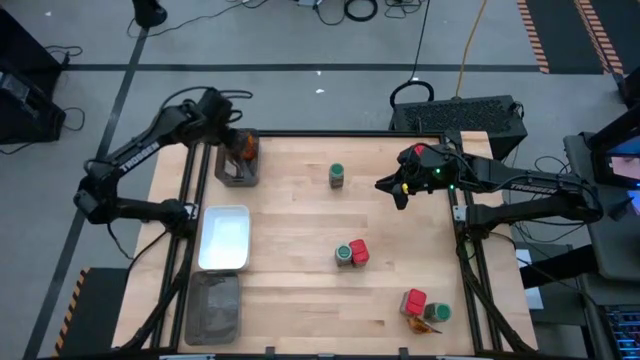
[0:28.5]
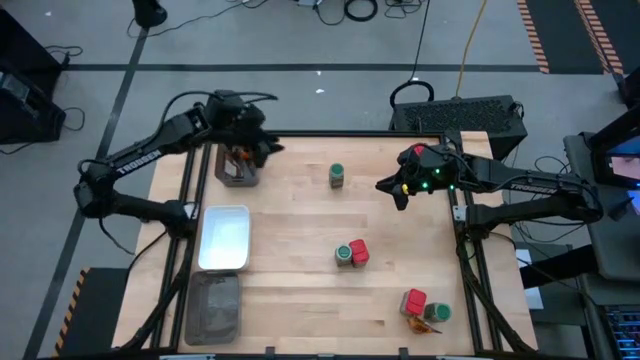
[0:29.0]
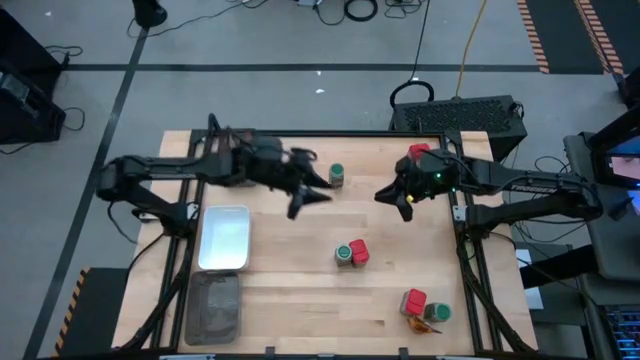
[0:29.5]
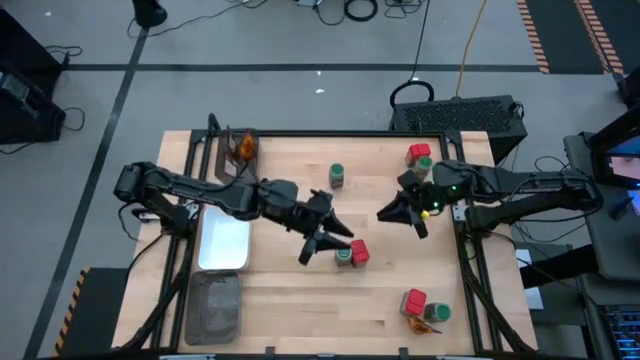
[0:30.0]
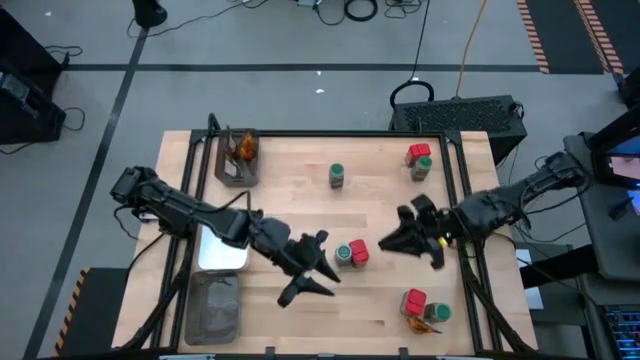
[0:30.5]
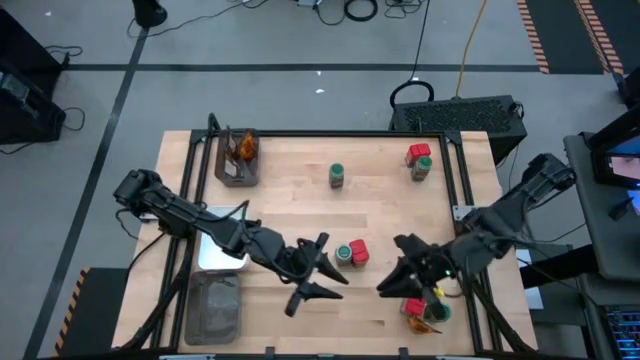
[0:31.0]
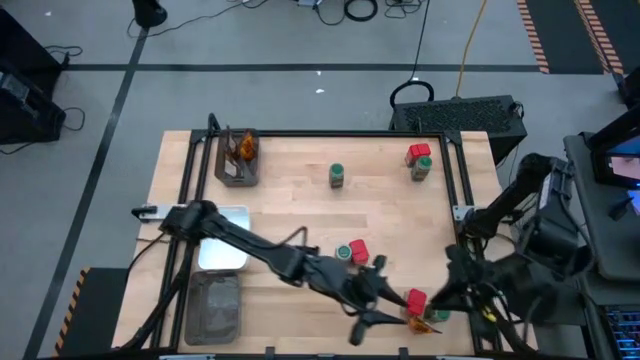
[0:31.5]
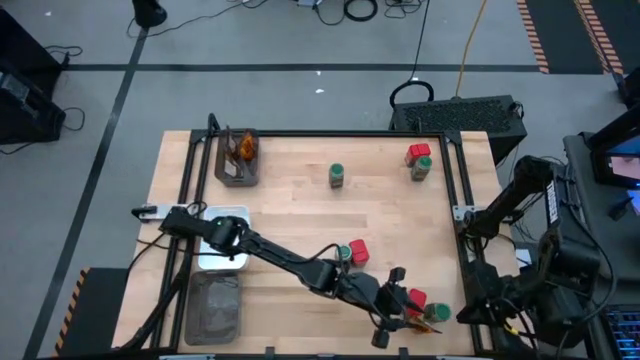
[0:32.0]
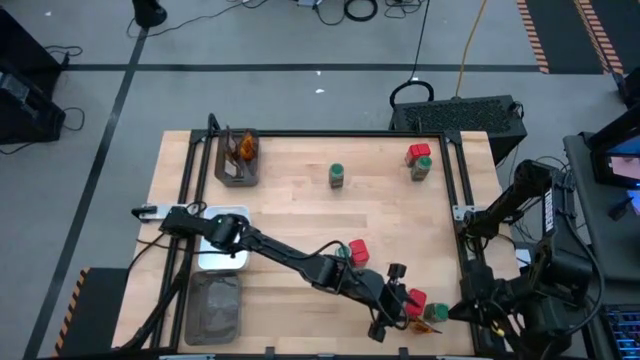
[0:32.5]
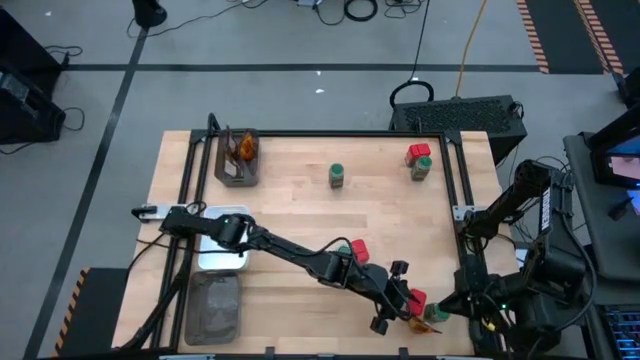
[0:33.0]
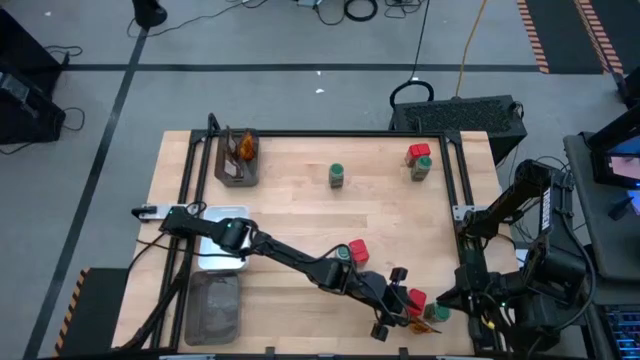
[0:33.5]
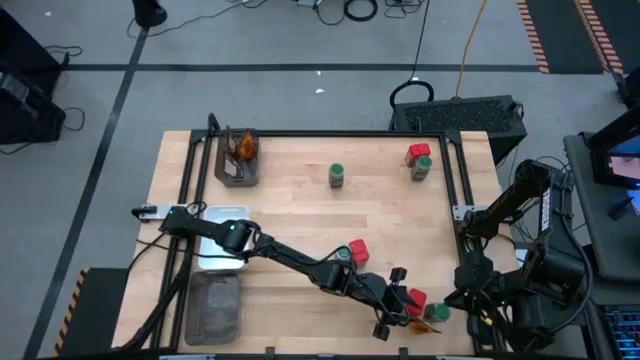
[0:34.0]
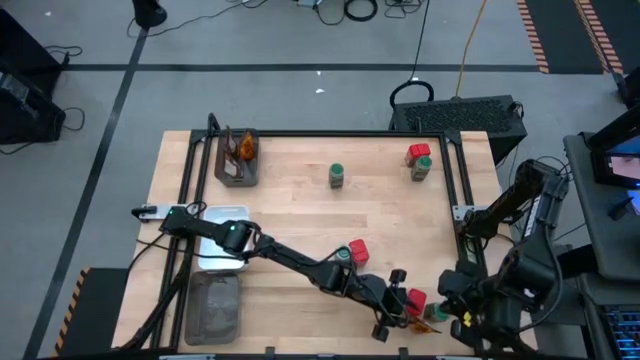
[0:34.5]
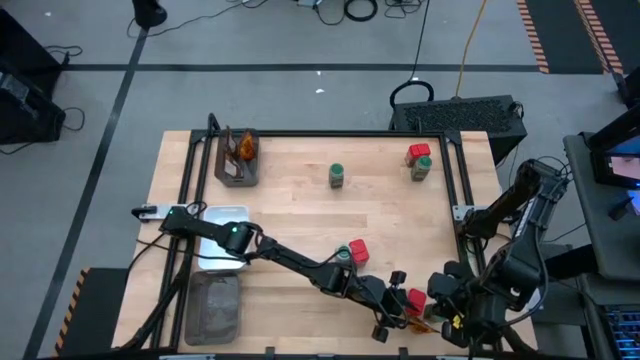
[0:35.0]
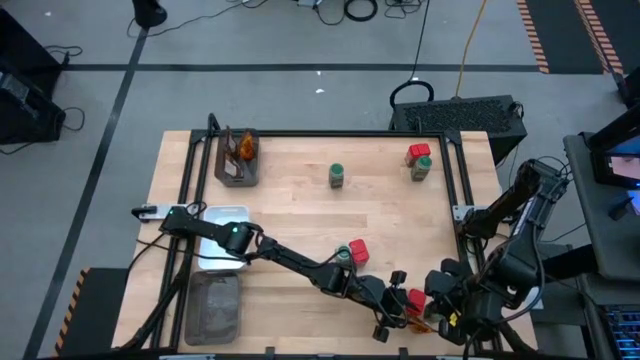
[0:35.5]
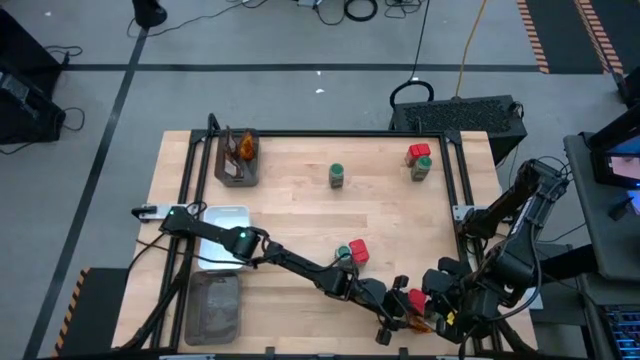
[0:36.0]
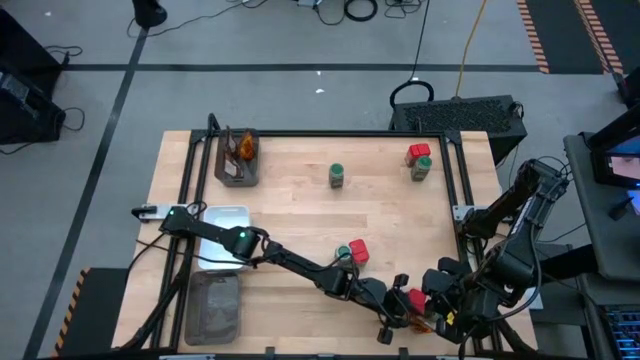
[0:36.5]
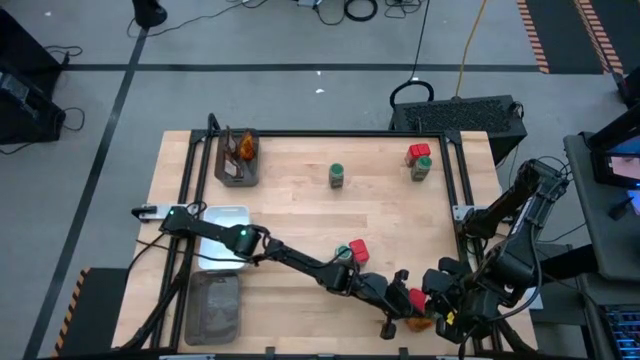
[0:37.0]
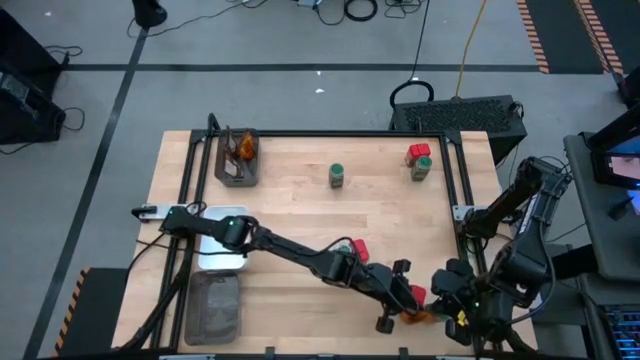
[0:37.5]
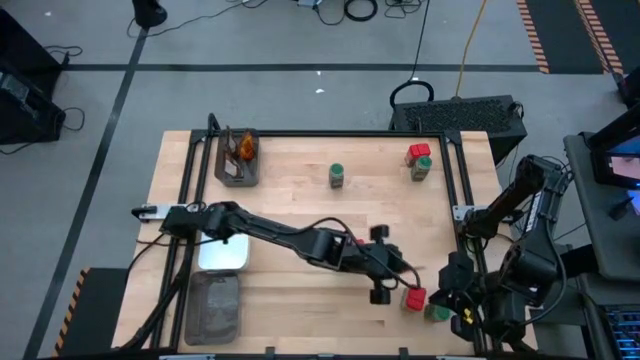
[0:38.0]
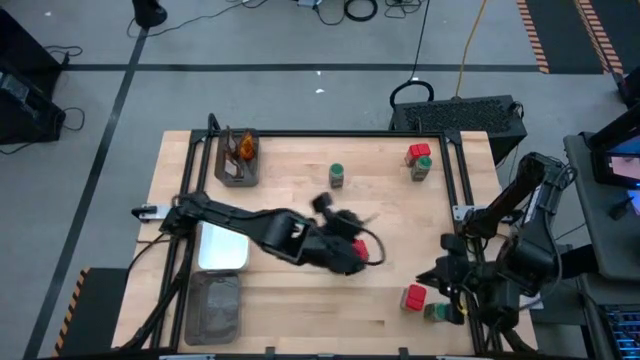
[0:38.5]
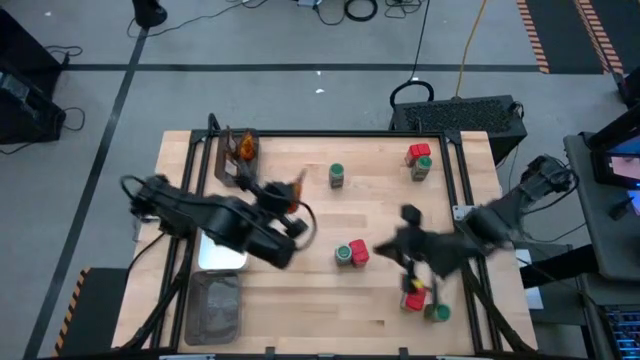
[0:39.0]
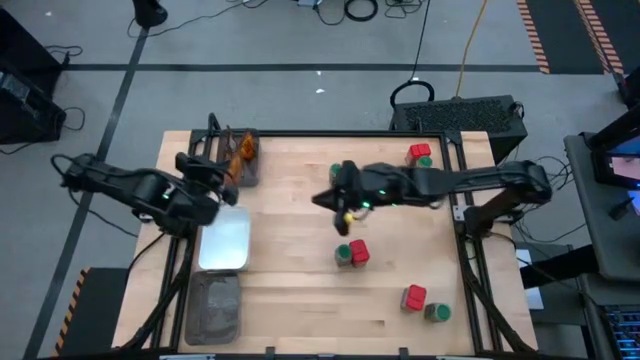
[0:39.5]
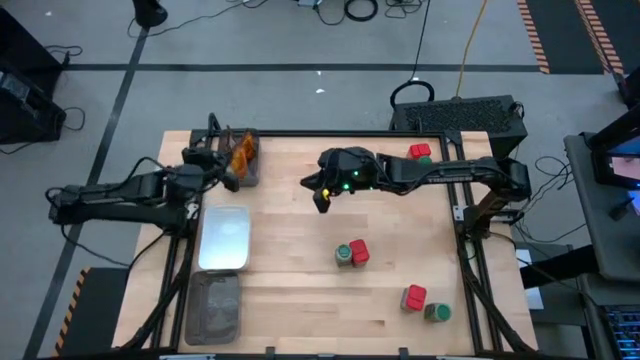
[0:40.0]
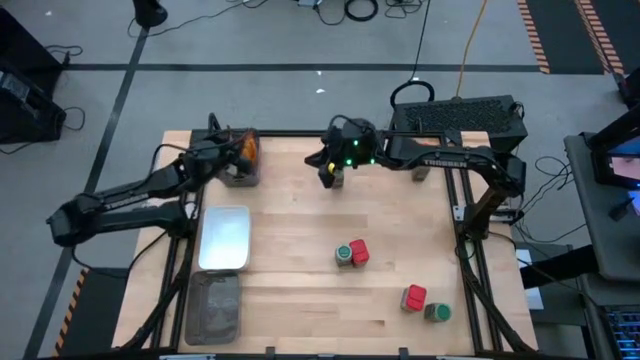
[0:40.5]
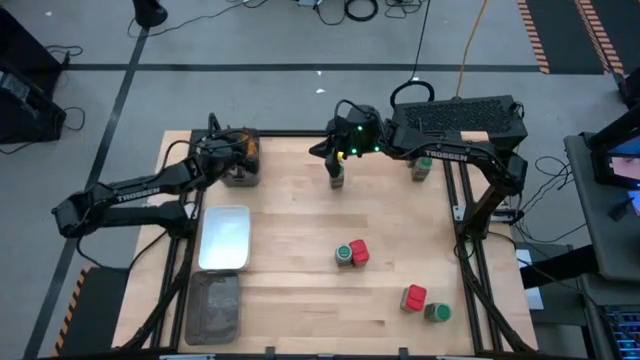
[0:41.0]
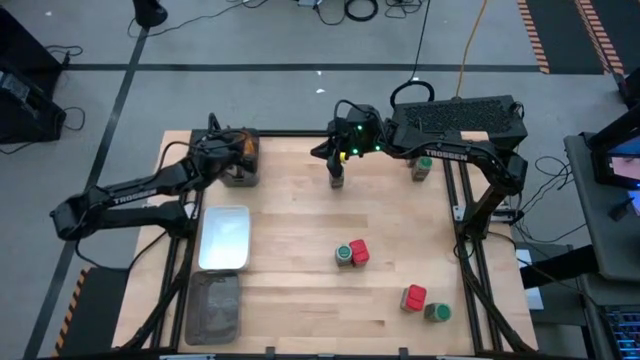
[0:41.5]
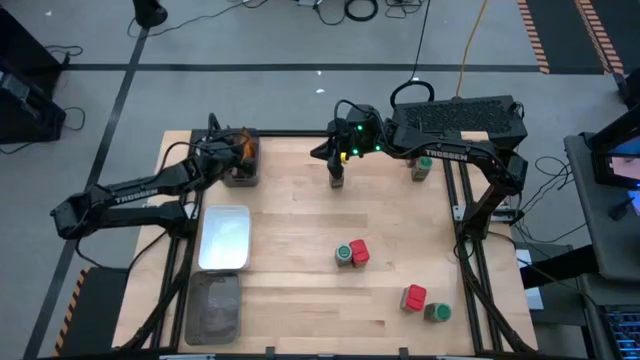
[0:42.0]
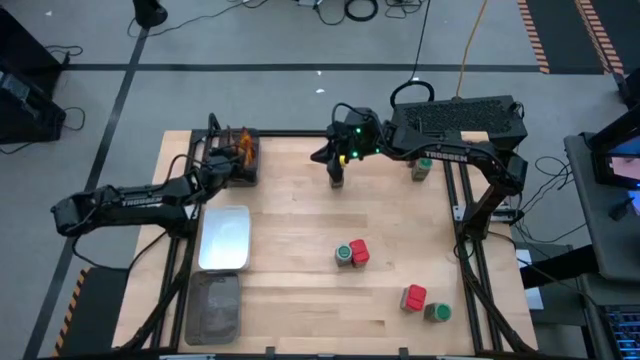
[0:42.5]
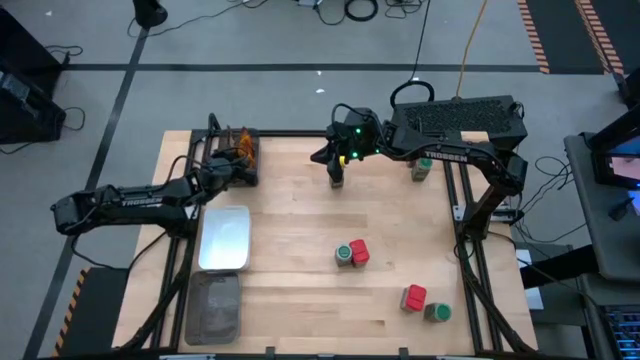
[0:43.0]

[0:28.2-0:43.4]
Task: Sort spices by type
Put the orange seasoning pack into the top black bin

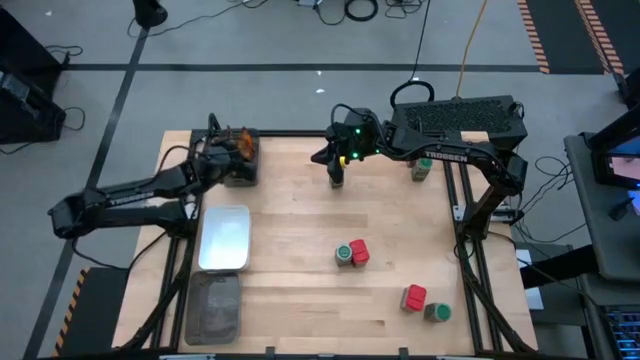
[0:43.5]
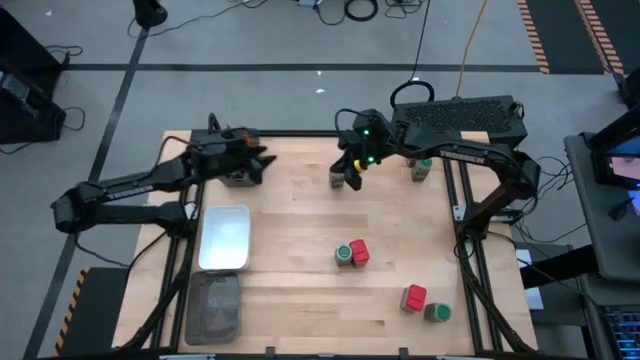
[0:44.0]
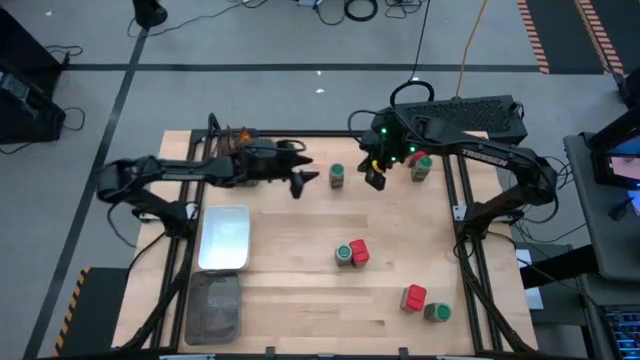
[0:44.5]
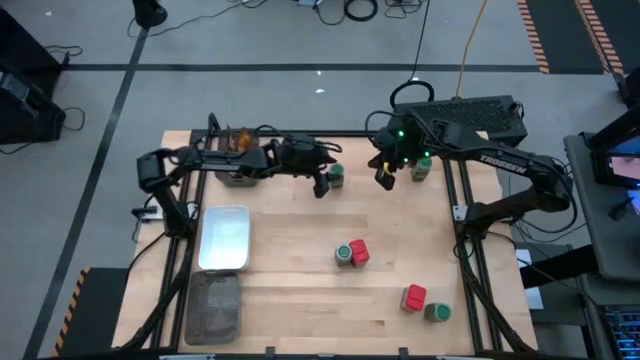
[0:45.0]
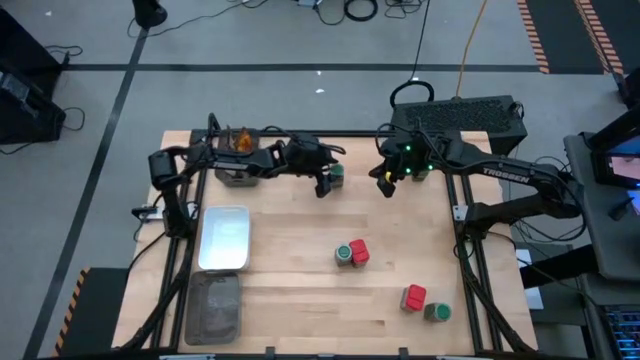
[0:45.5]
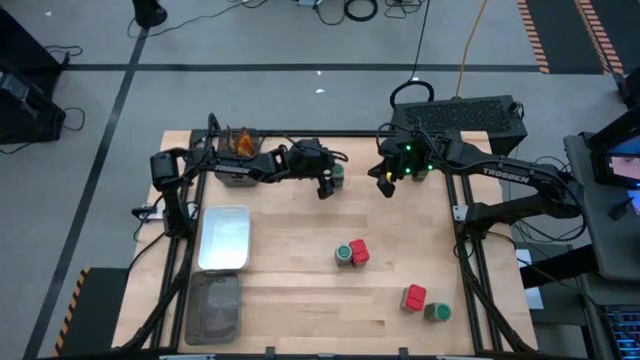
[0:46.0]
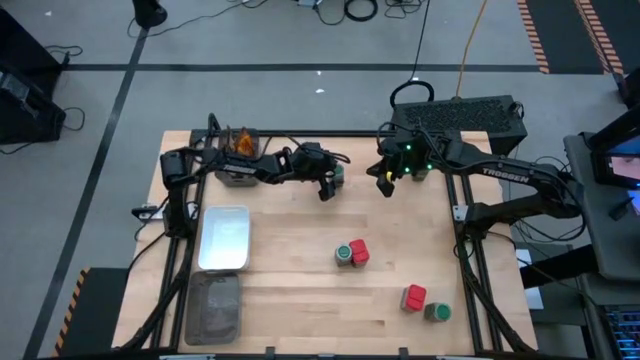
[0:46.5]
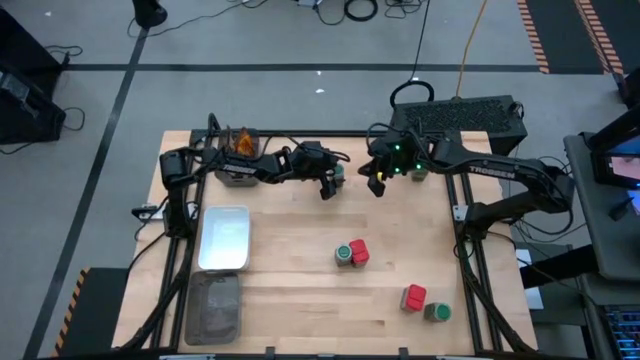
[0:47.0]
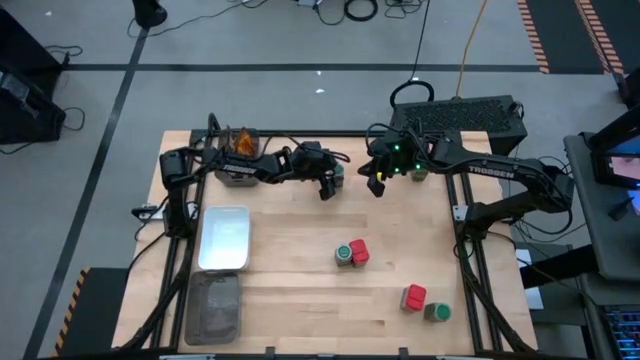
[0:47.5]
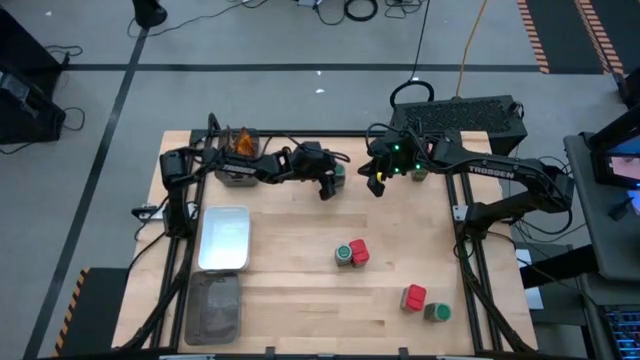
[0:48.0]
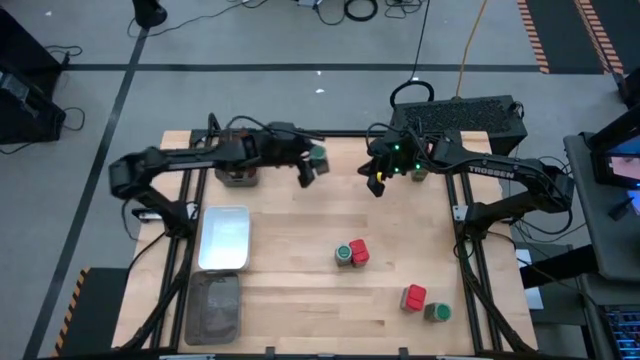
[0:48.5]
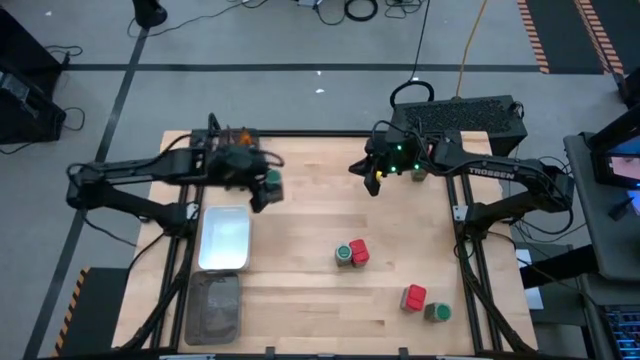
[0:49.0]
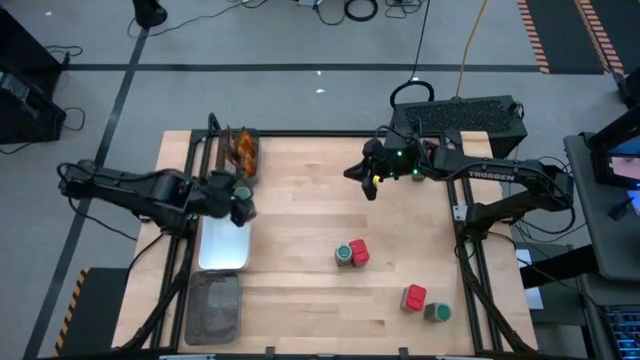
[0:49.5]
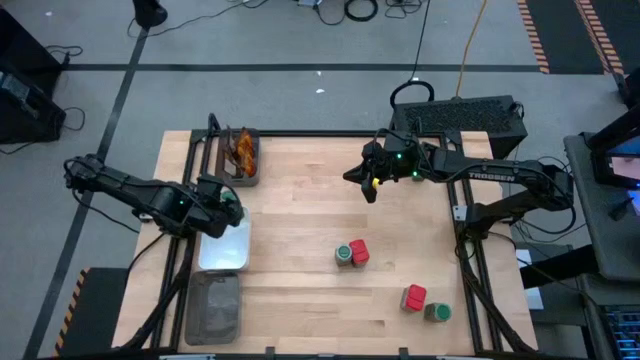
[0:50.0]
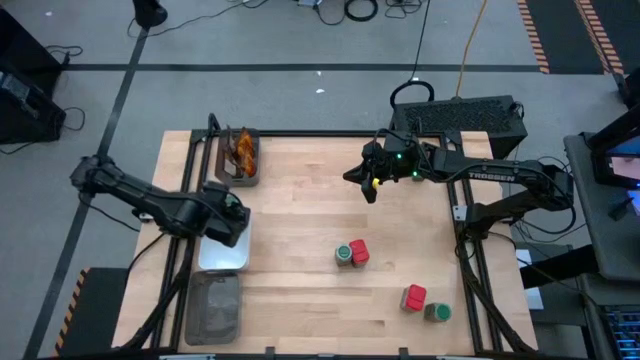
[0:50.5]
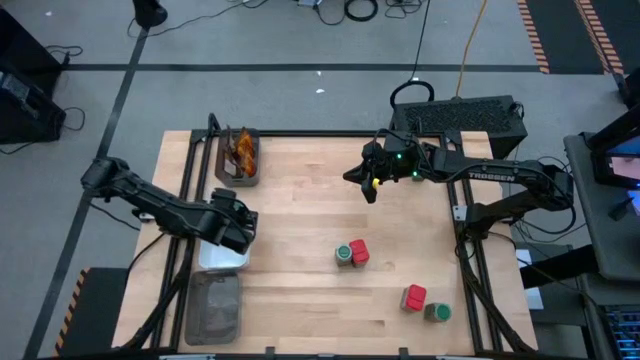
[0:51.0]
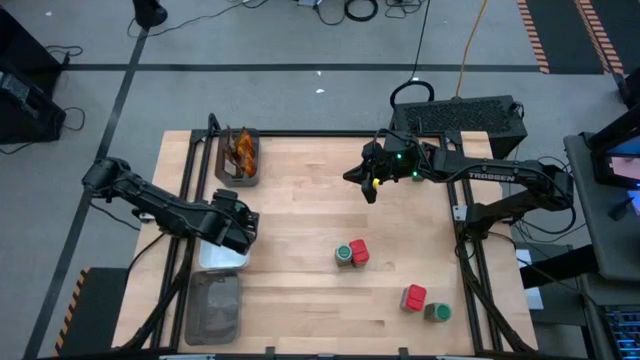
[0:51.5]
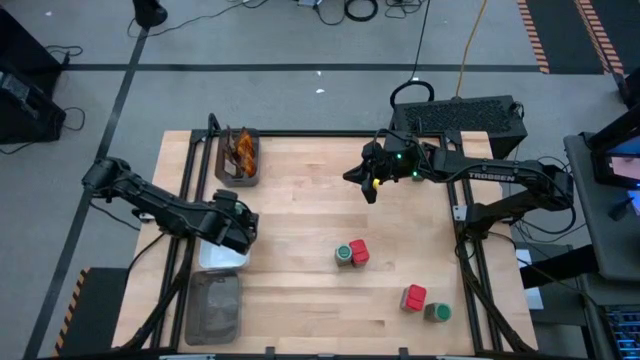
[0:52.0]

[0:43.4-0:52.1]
Put the top left green seasoning bottle into the white bin
